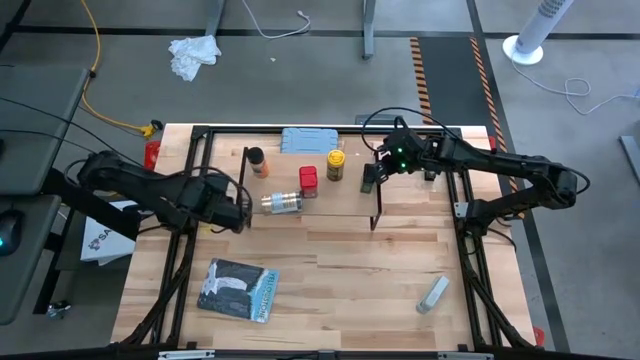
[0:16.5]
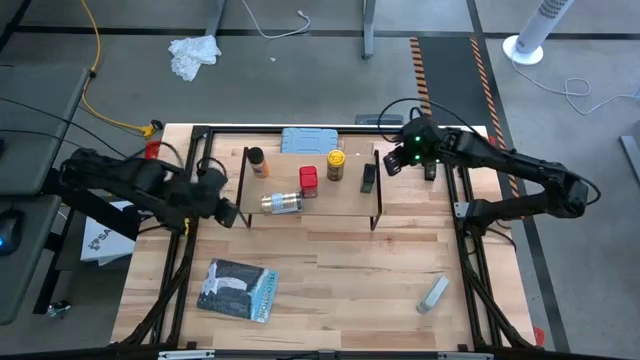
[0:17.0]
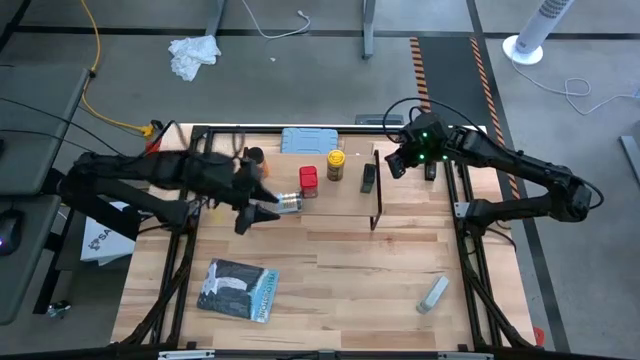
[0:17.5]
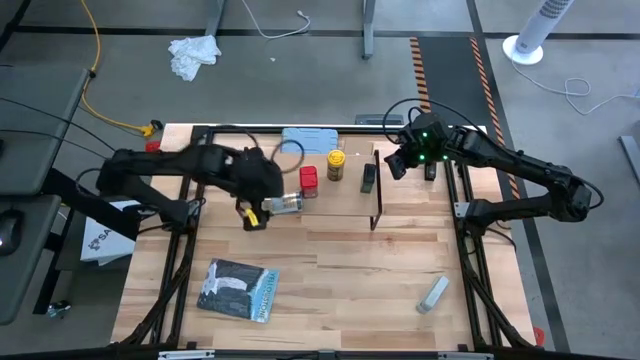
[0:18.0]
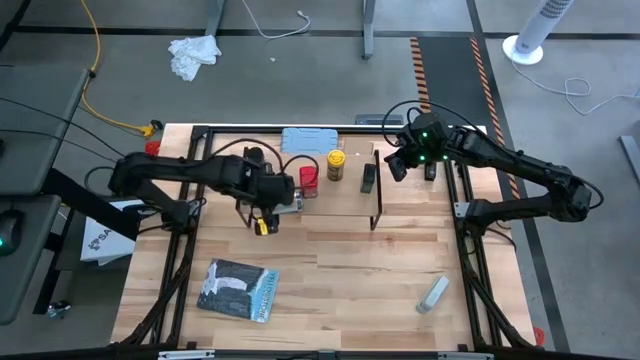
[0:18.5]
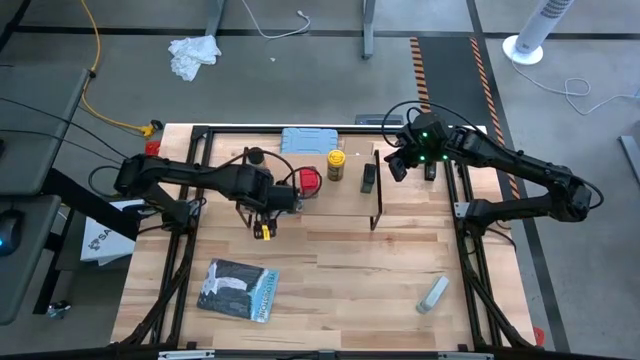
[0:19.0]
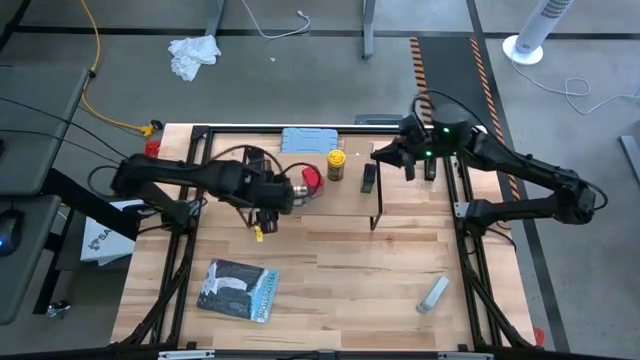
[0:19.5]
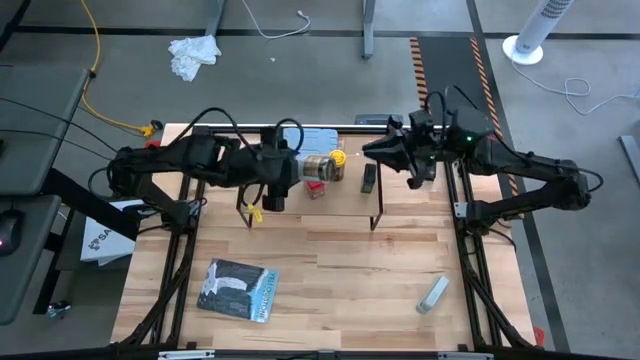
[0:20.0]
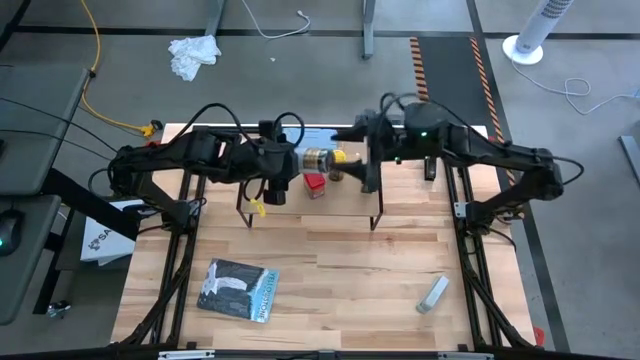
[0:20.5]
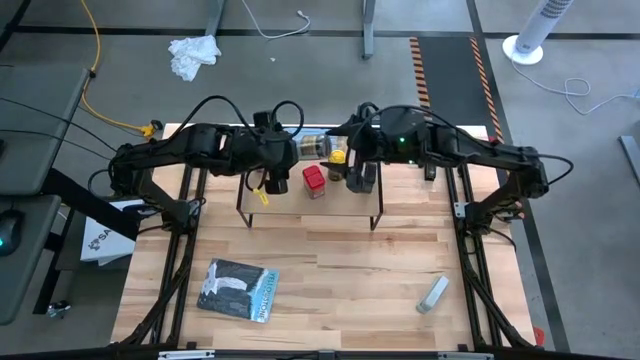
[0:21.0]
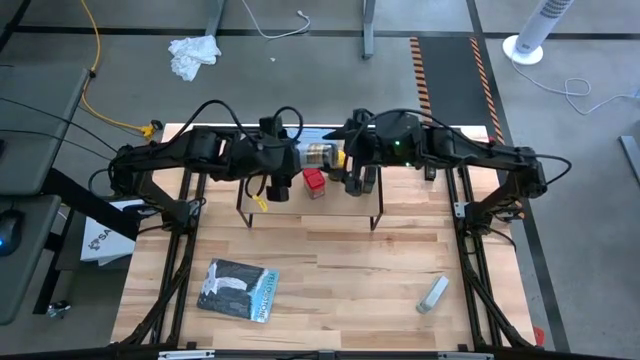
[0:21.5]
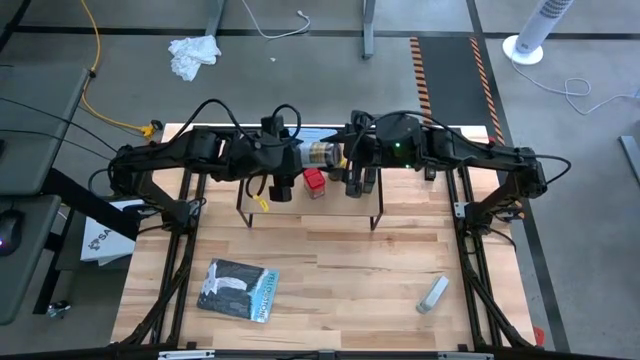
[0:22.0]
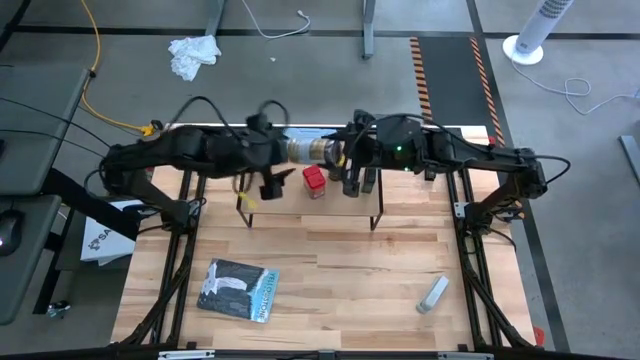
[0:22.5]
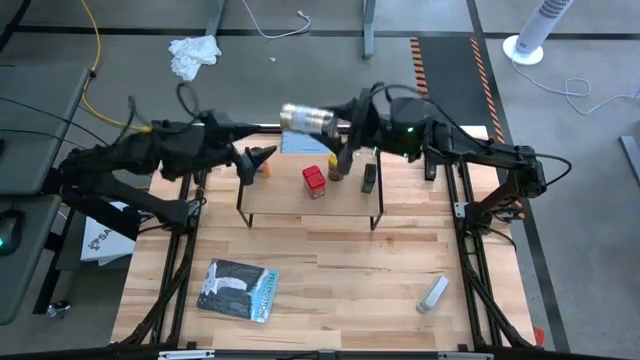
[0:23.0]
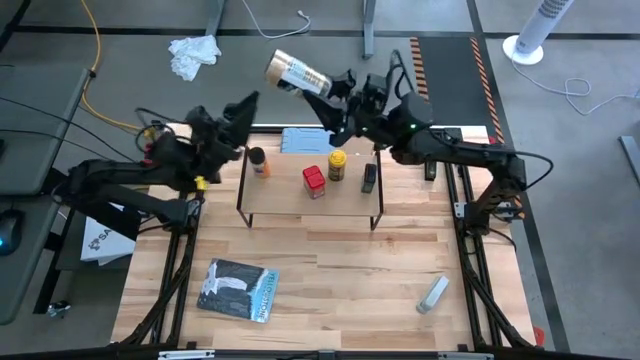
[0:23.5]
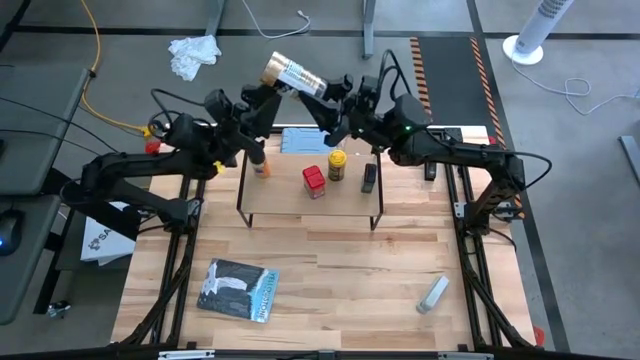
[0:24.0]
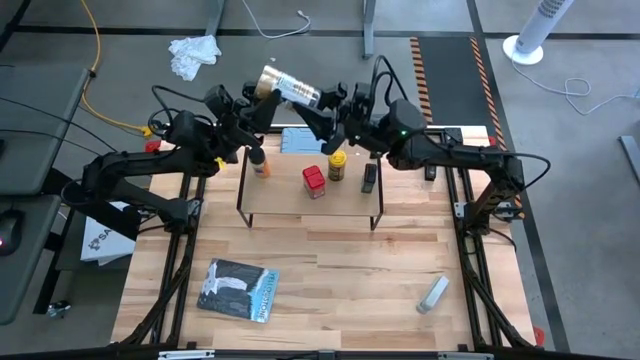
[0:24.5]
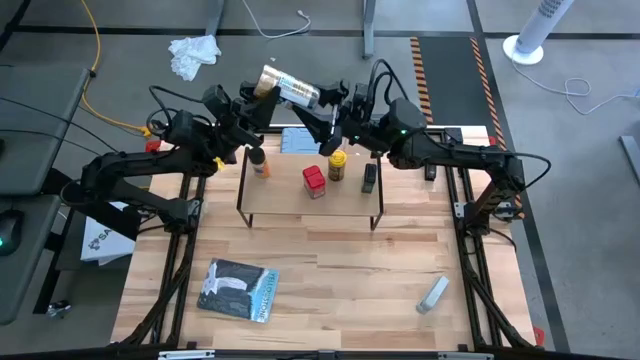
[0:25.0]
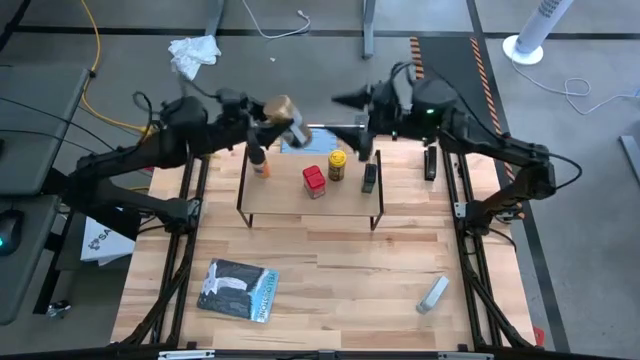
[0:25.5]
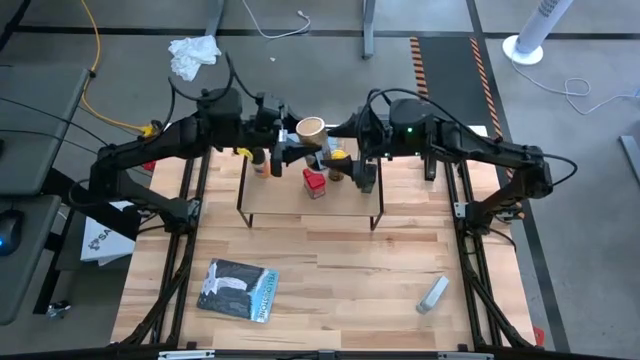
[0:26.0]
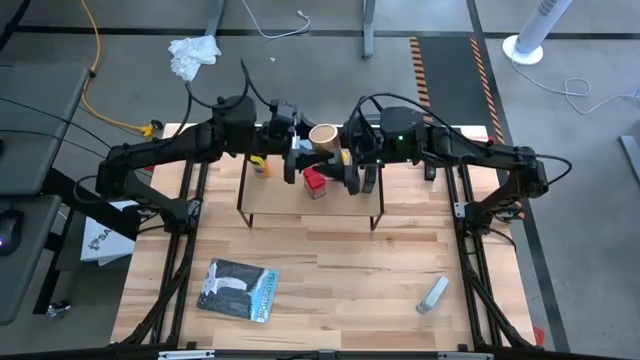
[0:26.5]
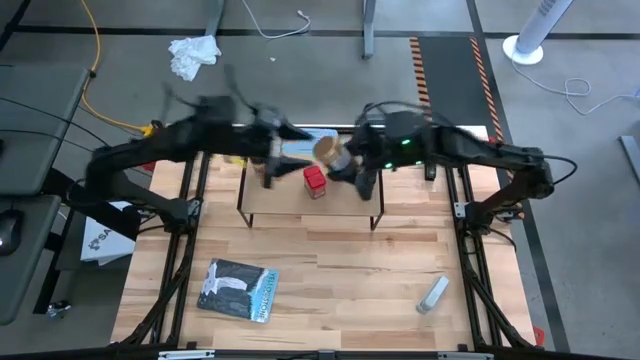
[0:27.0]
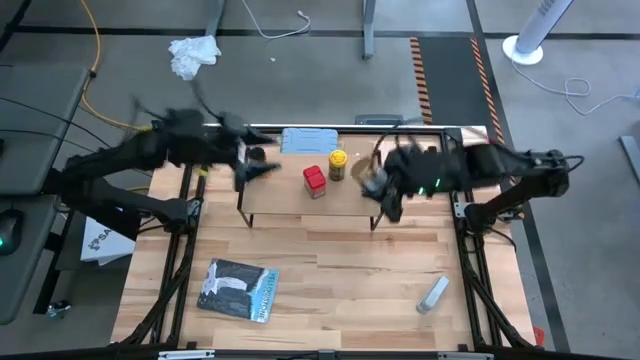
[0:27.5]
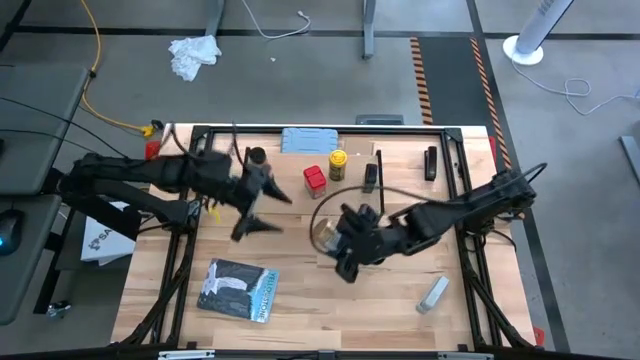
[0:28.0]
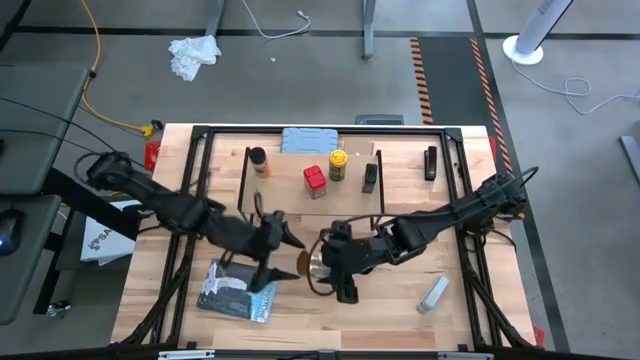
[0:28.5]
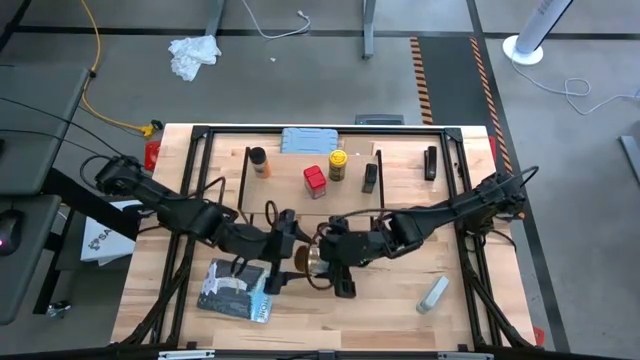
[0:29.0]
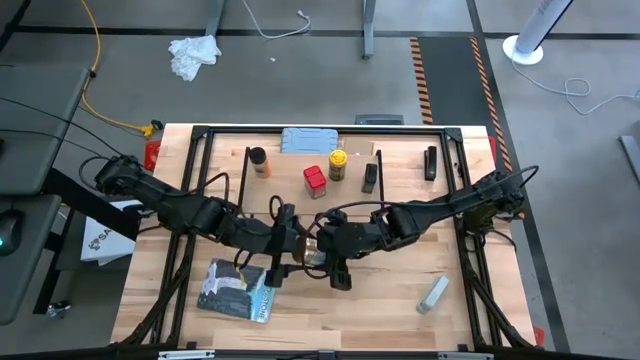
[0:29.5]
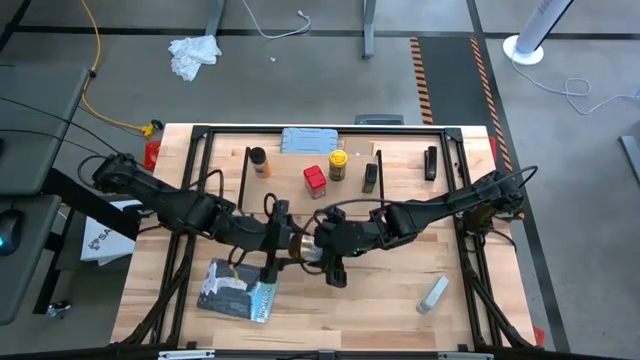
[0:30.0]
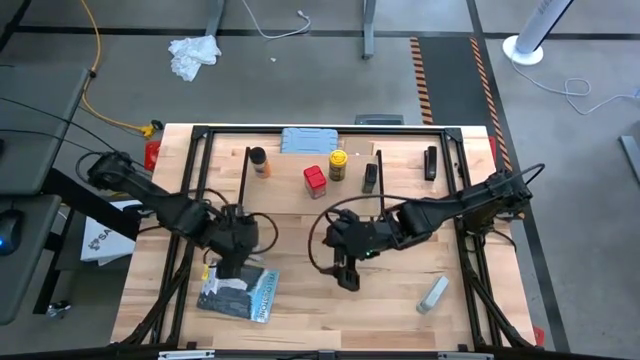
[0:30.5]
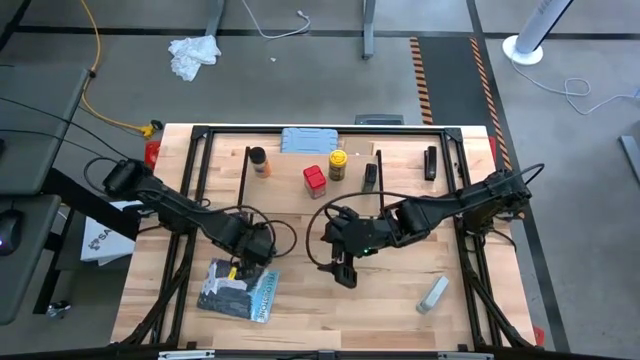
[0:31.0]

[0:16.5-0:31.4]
Task: Shelf spices
Remove the gold seasoning bottle from the shelf

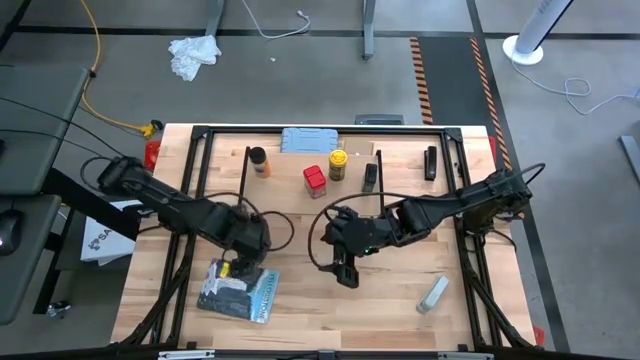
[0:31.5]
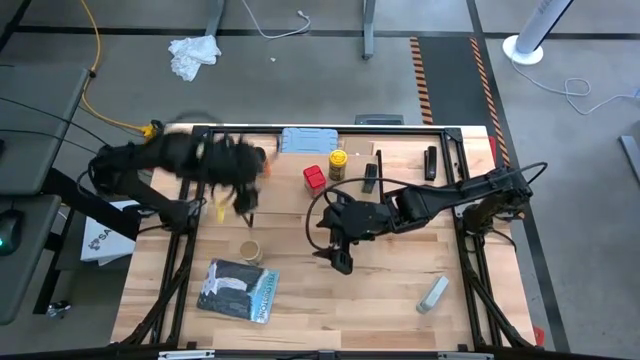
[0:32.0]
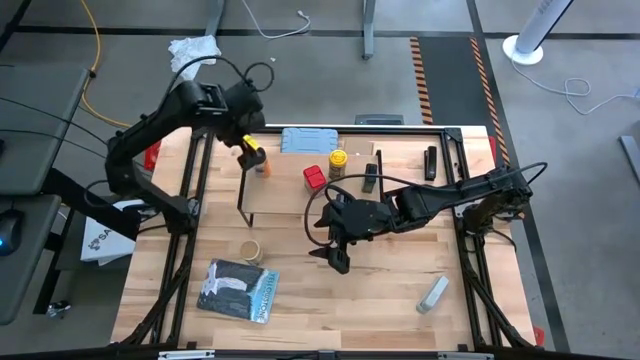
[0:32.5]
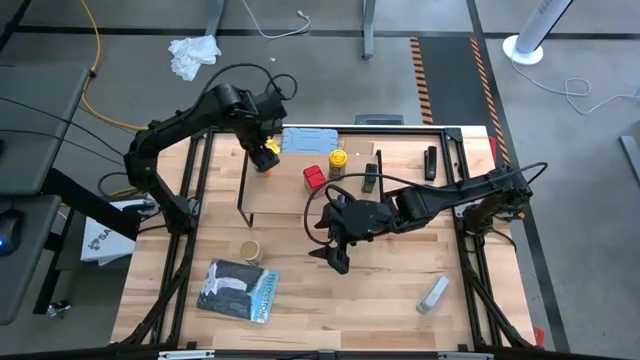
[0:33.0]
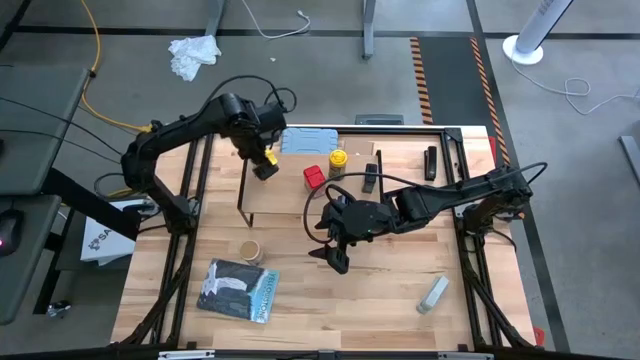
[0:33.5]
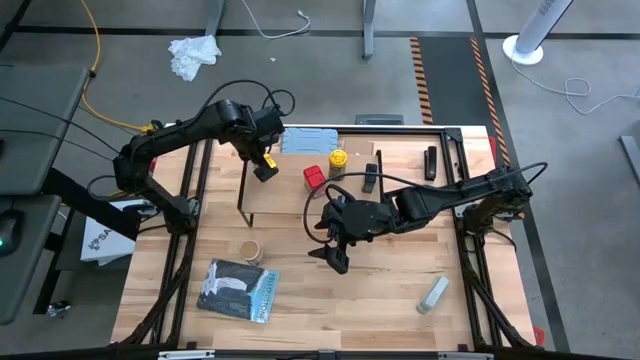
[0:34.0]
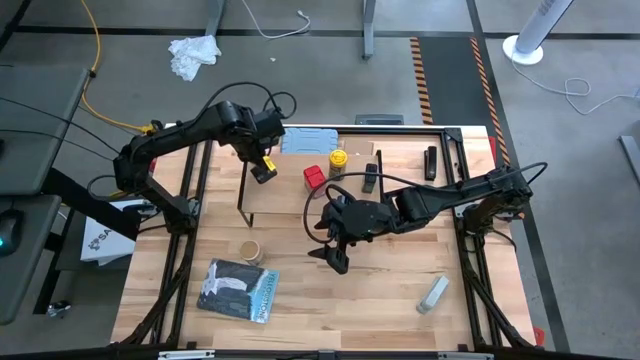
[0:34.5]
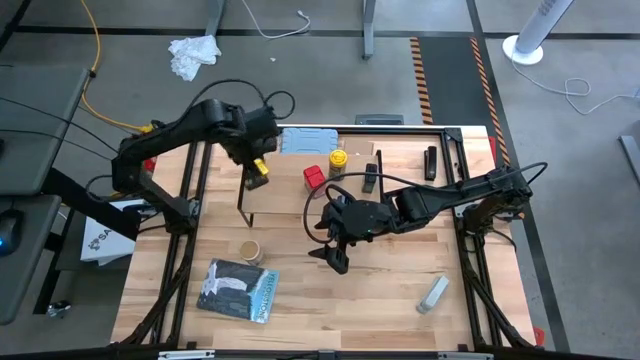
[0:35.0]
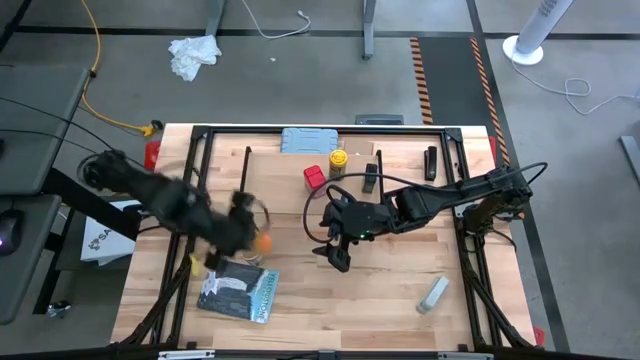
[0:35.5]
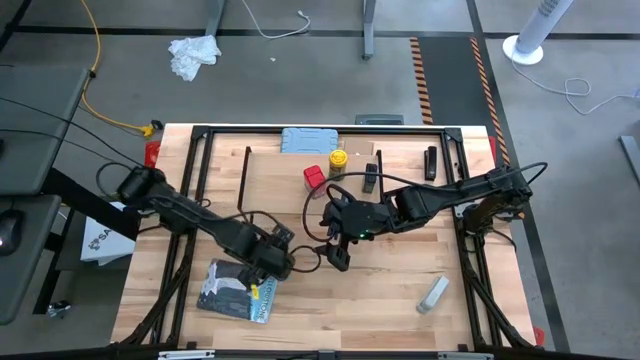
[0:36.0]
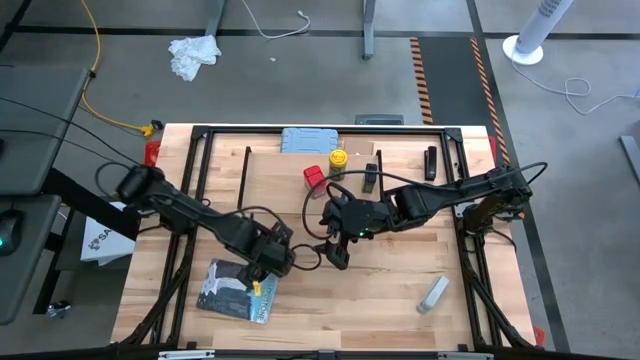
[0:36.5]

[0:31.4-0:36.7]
Remove the black seasoning bottle from the shelf

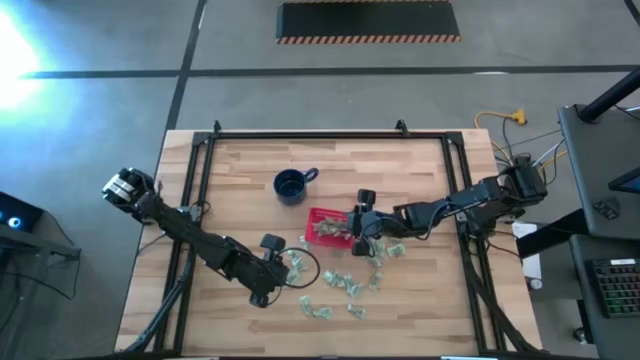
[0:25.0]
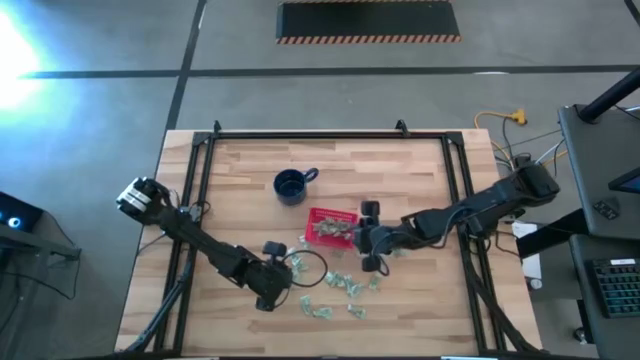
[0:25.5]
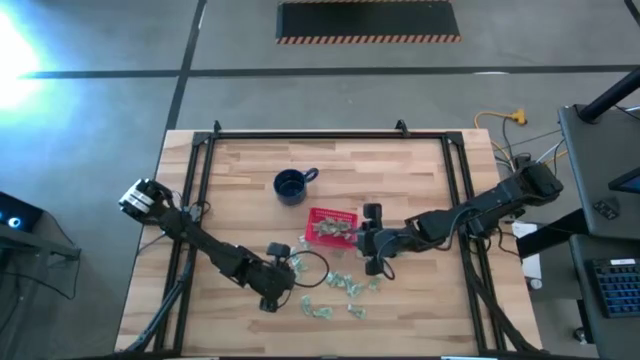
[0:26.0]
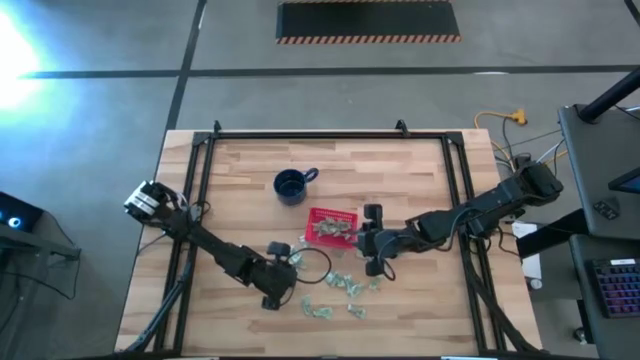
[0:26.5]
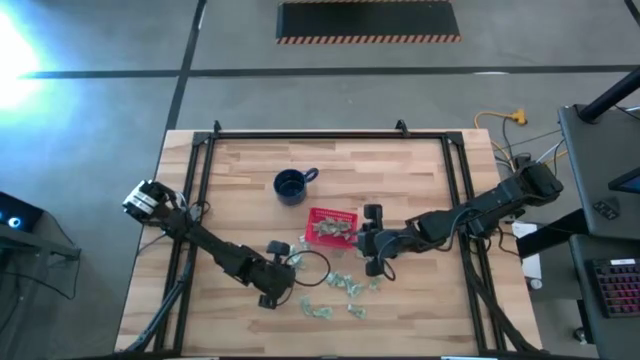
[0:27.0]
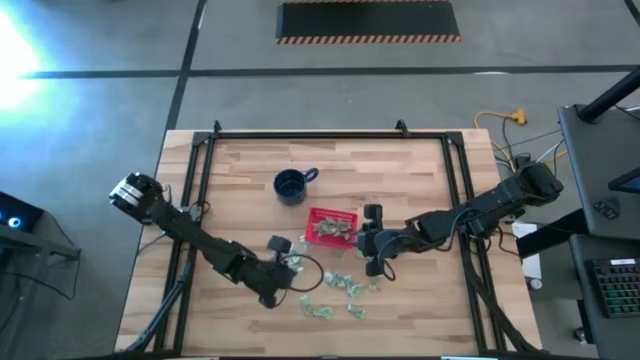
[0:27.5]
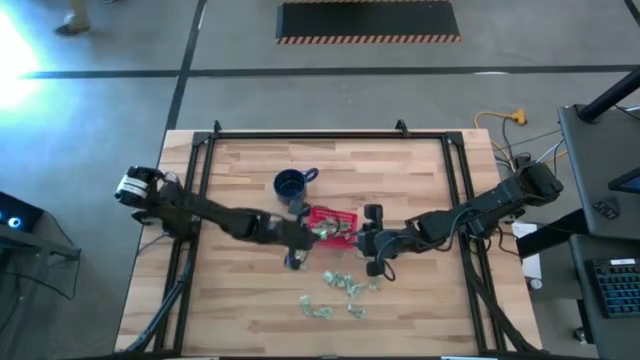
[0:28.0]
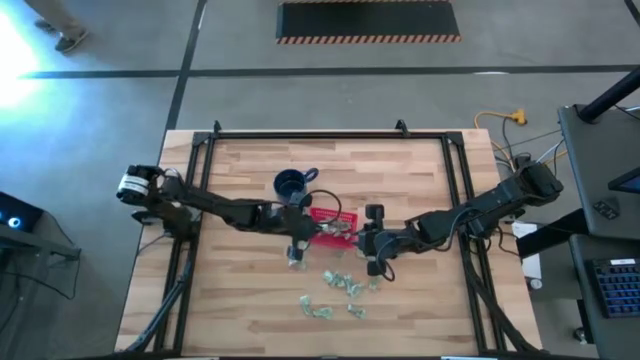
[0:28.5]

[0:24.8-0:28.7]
Task: Pick and place Stevia / Truvia into bins
Put the white stevia packet into the red basket
